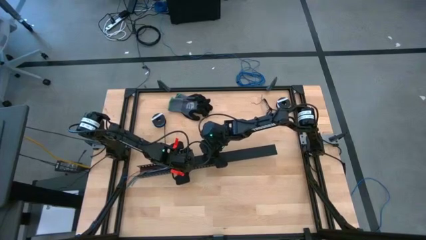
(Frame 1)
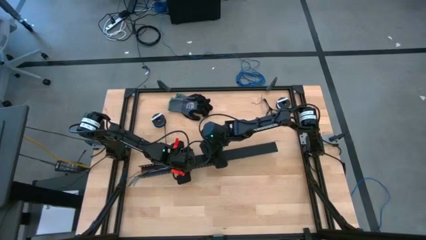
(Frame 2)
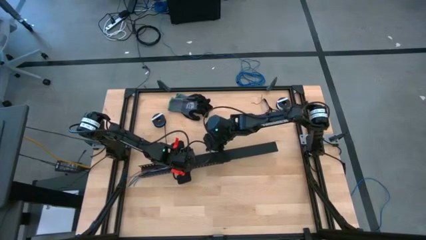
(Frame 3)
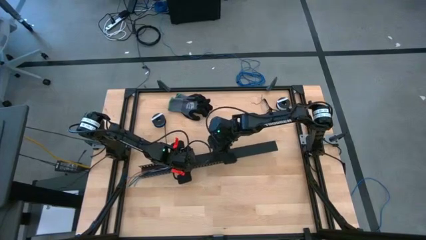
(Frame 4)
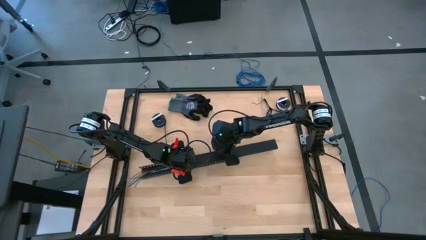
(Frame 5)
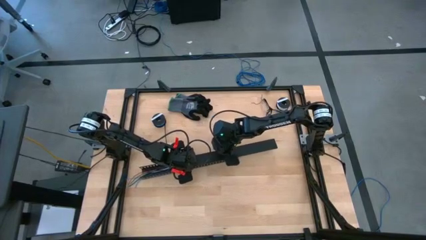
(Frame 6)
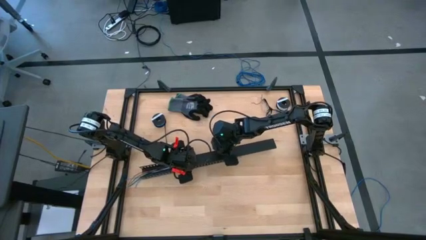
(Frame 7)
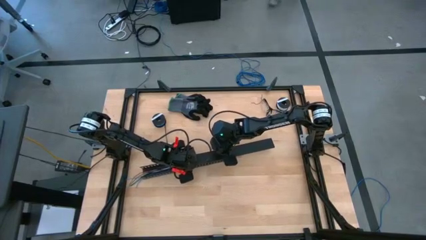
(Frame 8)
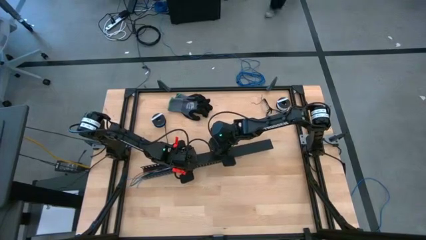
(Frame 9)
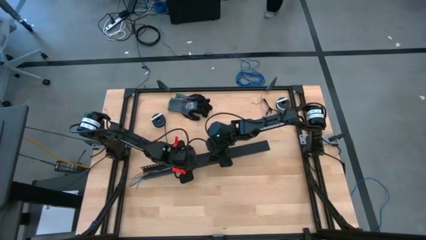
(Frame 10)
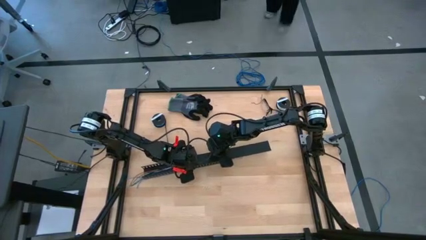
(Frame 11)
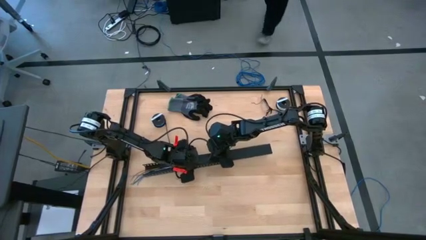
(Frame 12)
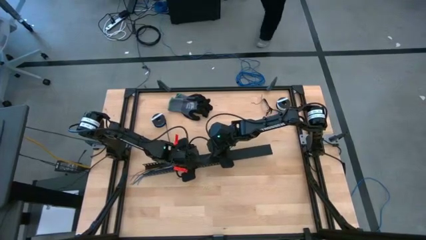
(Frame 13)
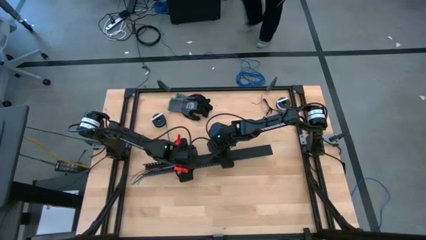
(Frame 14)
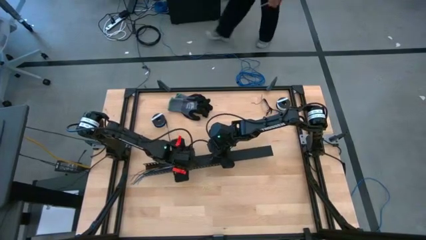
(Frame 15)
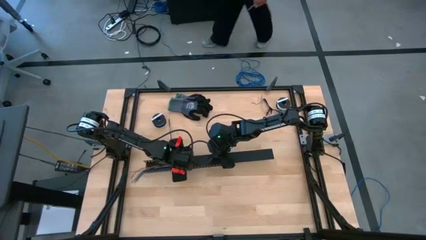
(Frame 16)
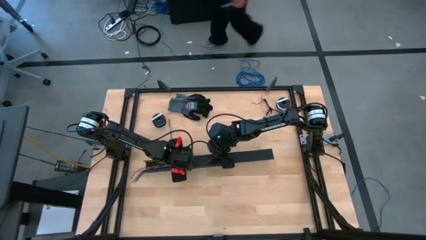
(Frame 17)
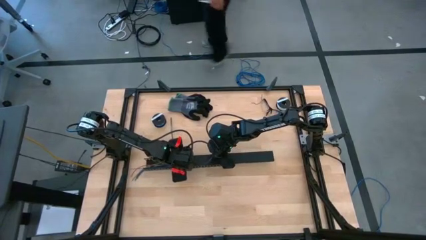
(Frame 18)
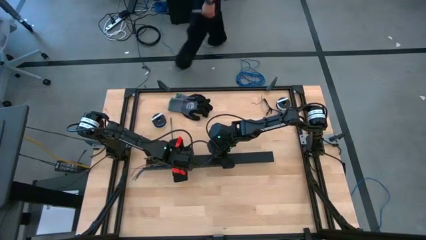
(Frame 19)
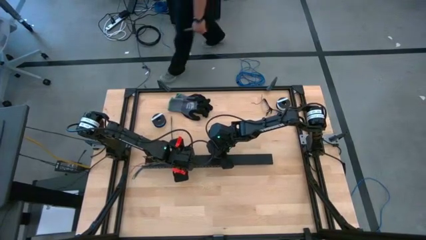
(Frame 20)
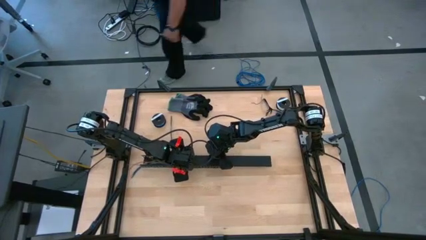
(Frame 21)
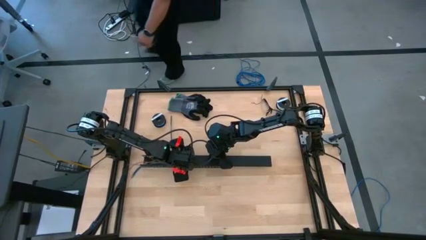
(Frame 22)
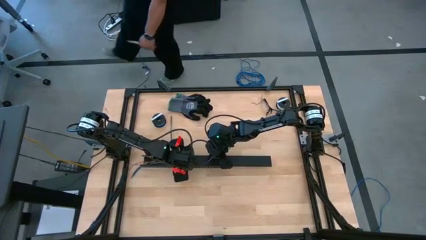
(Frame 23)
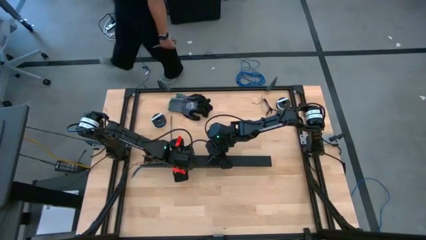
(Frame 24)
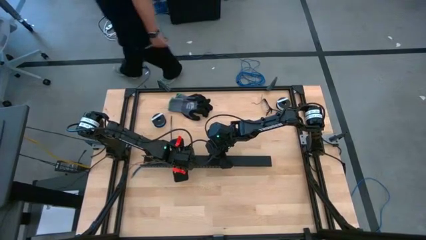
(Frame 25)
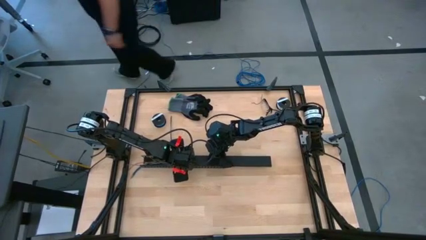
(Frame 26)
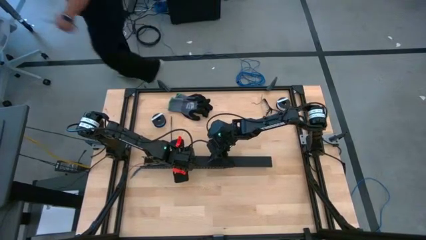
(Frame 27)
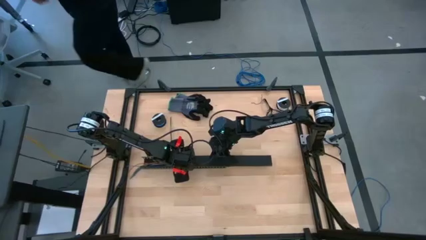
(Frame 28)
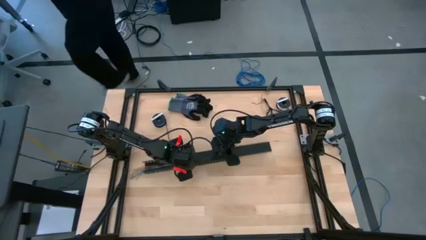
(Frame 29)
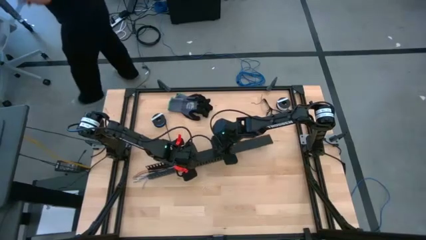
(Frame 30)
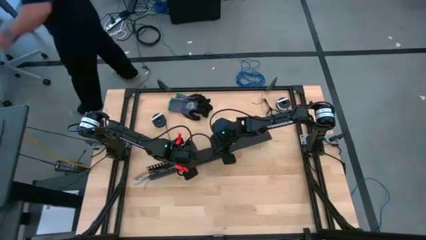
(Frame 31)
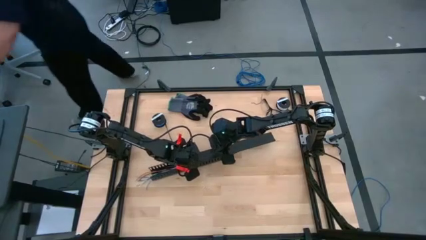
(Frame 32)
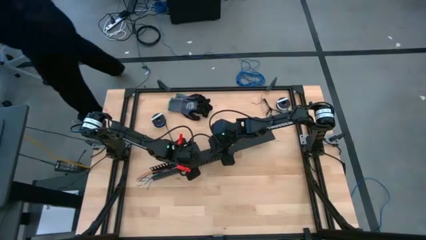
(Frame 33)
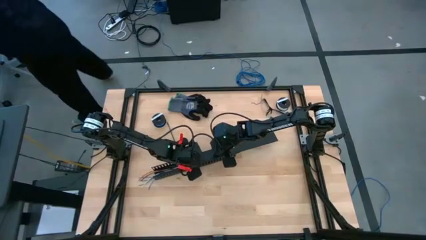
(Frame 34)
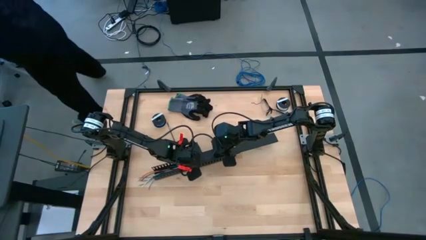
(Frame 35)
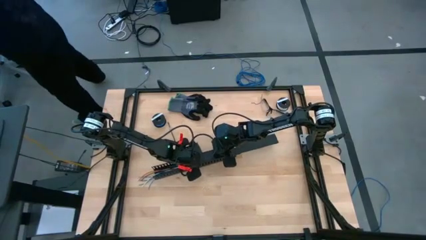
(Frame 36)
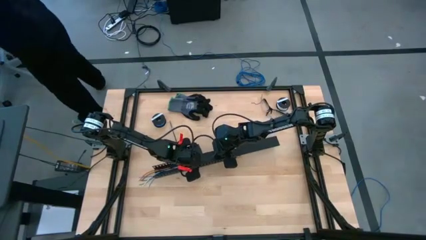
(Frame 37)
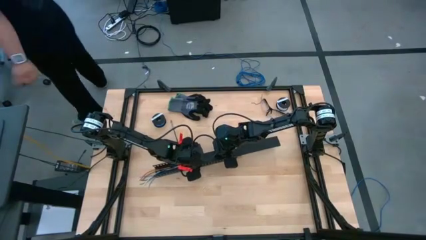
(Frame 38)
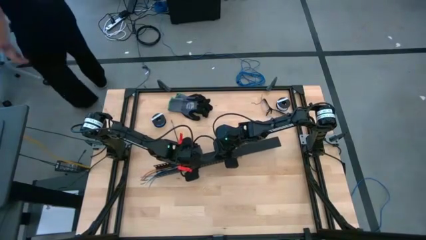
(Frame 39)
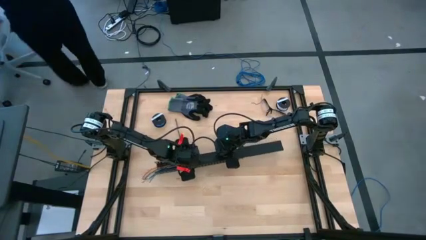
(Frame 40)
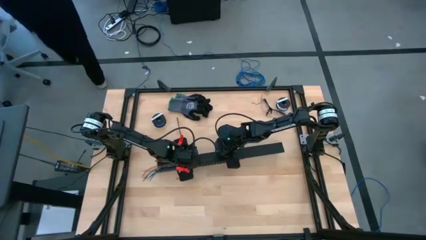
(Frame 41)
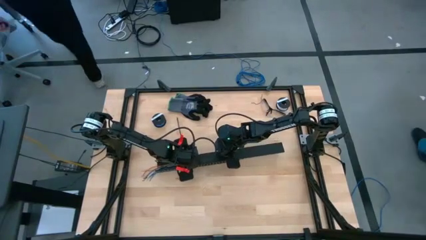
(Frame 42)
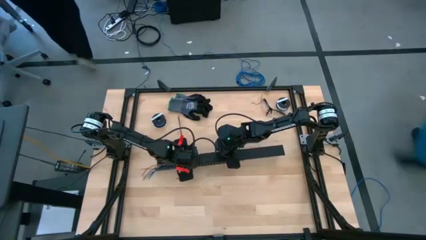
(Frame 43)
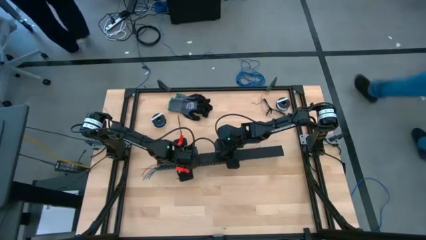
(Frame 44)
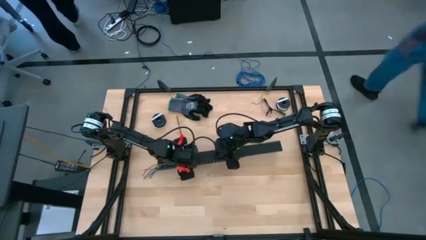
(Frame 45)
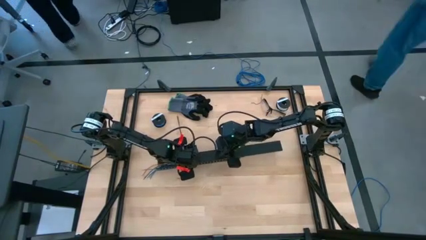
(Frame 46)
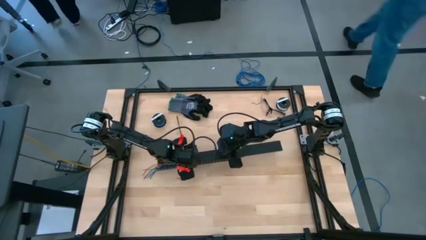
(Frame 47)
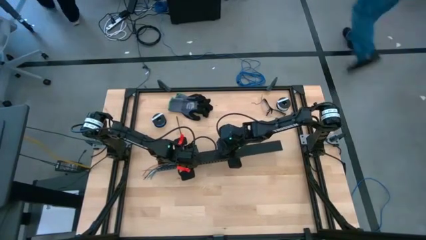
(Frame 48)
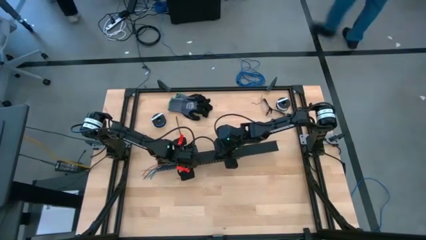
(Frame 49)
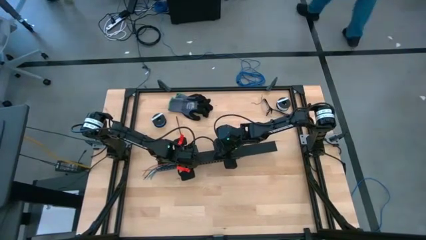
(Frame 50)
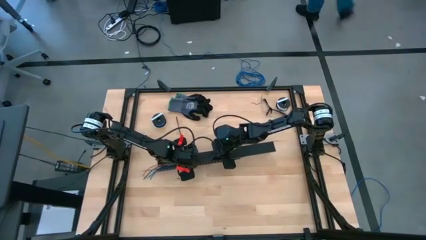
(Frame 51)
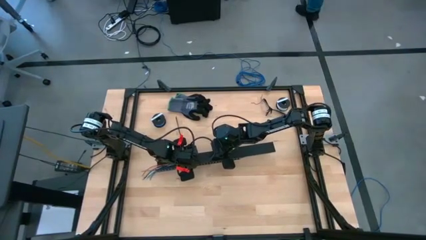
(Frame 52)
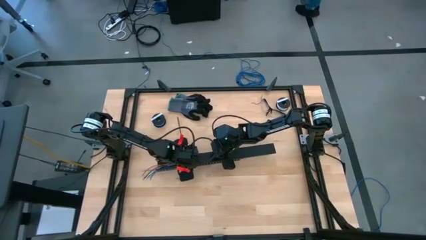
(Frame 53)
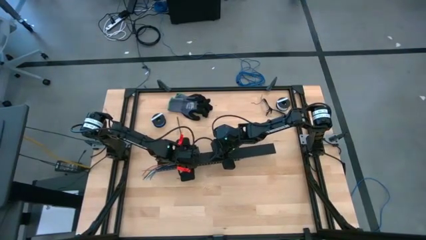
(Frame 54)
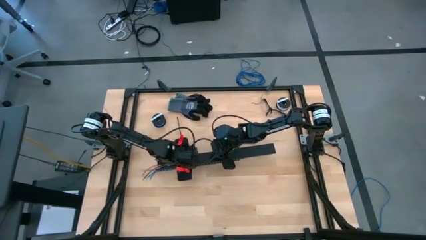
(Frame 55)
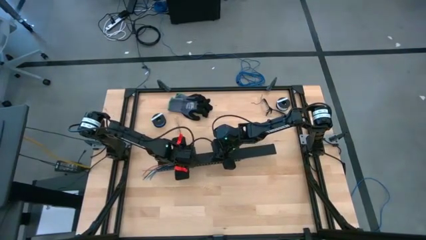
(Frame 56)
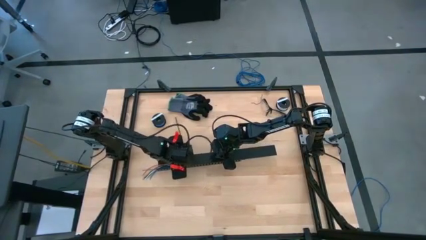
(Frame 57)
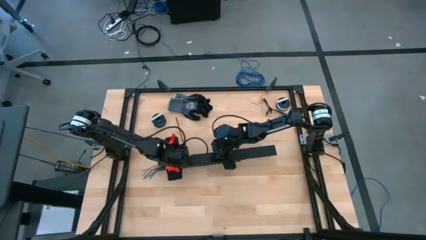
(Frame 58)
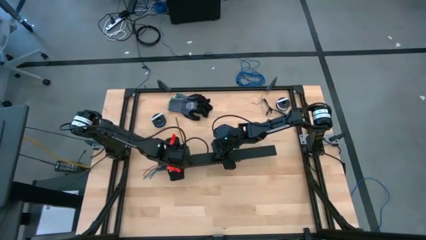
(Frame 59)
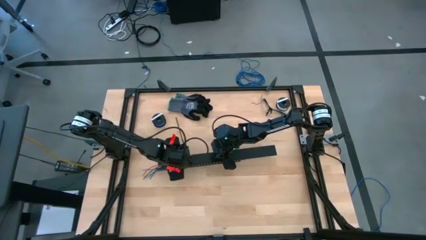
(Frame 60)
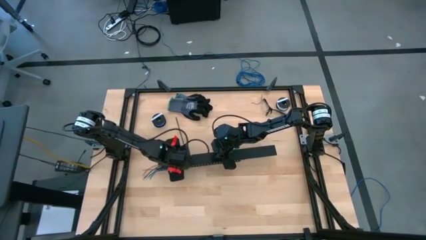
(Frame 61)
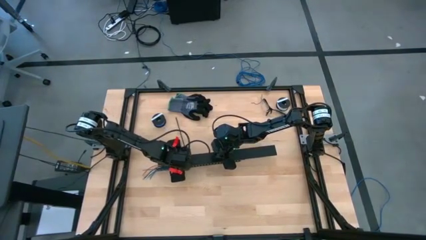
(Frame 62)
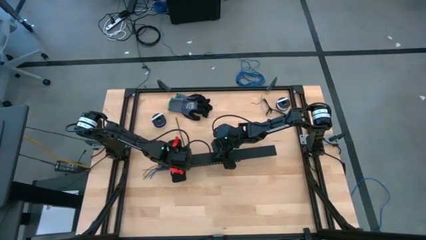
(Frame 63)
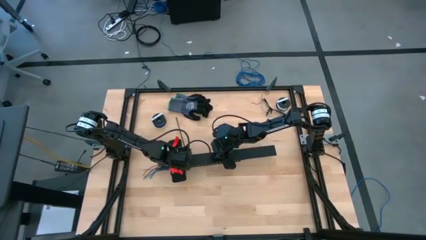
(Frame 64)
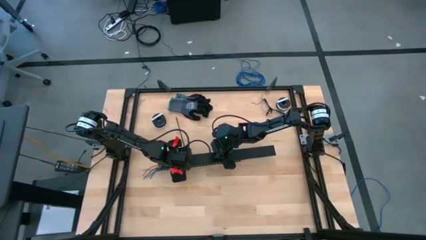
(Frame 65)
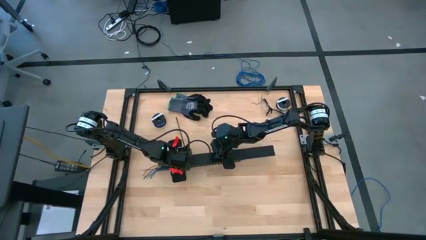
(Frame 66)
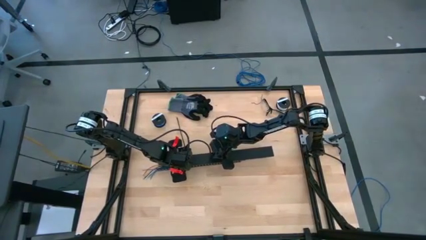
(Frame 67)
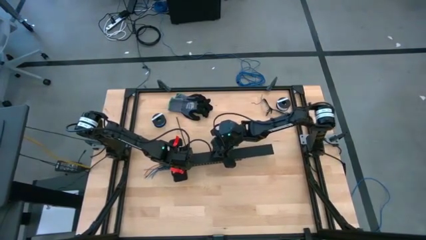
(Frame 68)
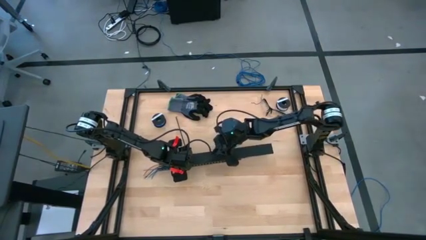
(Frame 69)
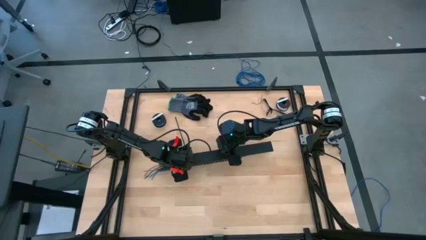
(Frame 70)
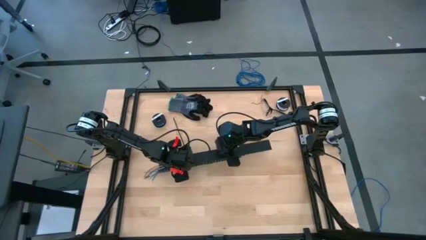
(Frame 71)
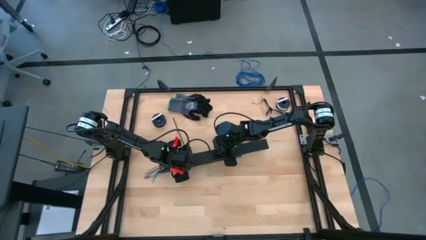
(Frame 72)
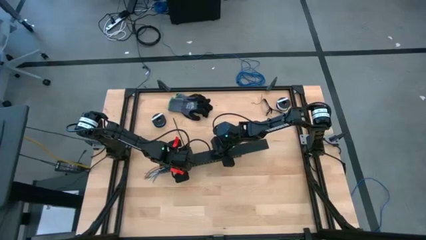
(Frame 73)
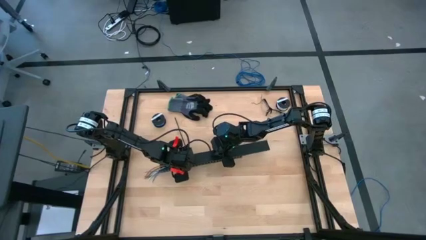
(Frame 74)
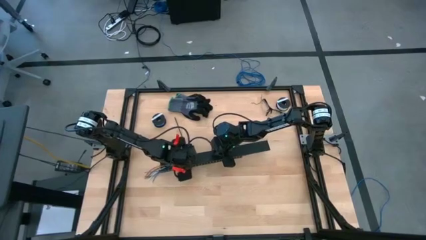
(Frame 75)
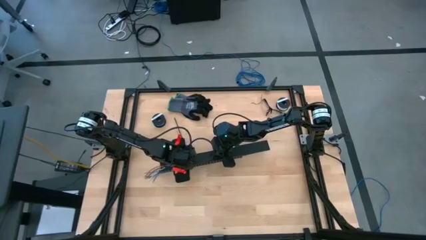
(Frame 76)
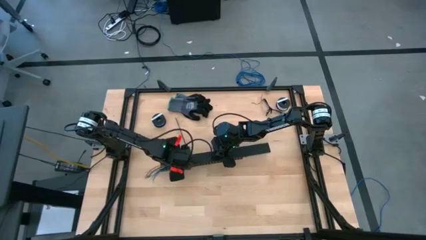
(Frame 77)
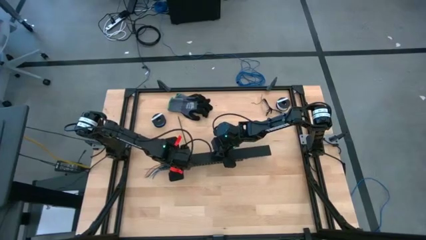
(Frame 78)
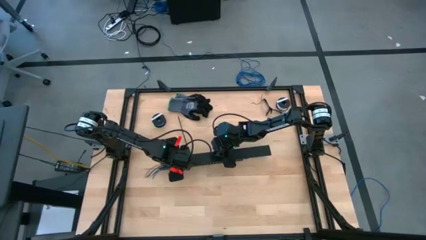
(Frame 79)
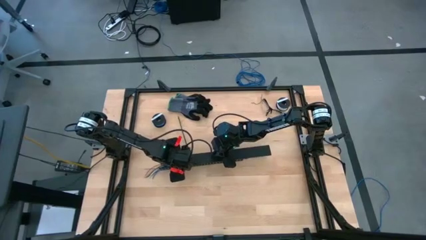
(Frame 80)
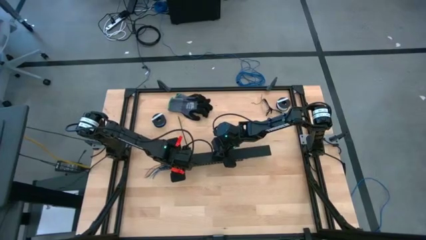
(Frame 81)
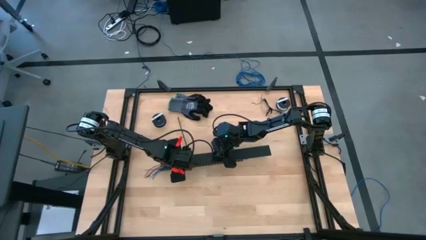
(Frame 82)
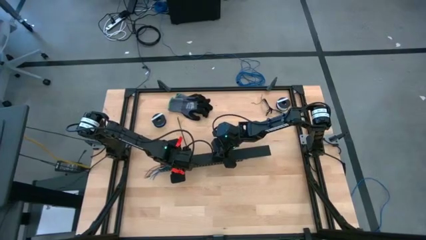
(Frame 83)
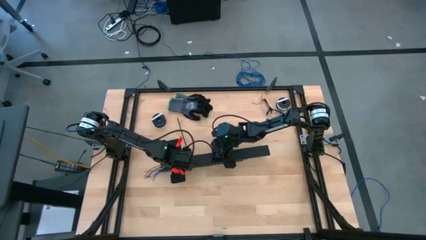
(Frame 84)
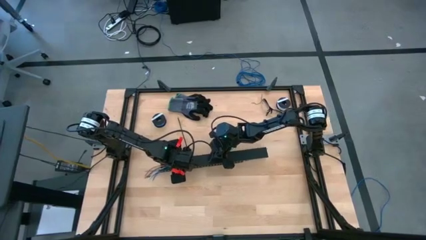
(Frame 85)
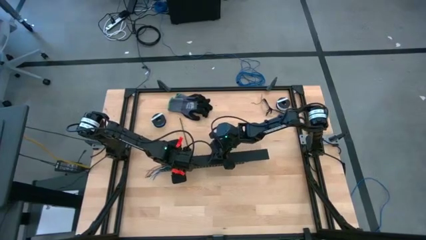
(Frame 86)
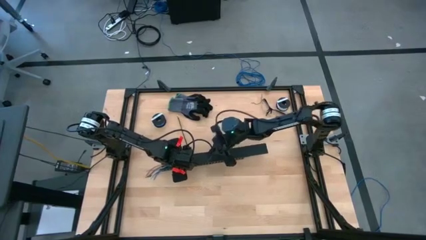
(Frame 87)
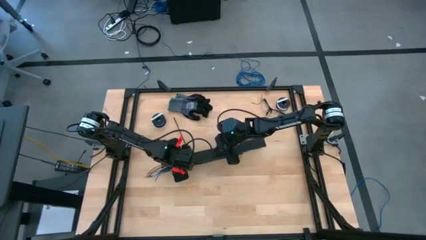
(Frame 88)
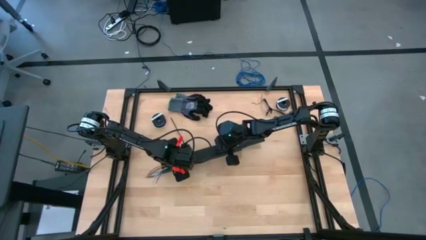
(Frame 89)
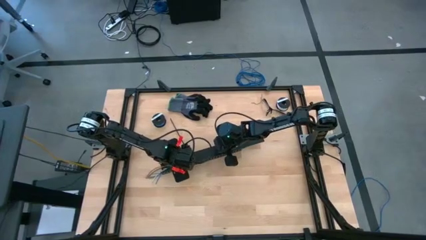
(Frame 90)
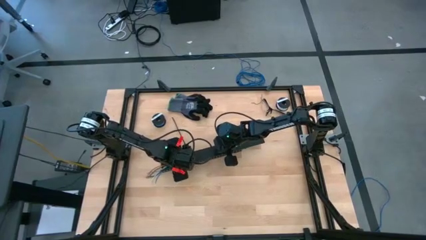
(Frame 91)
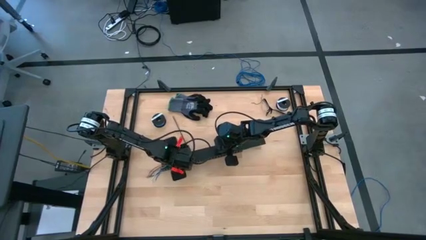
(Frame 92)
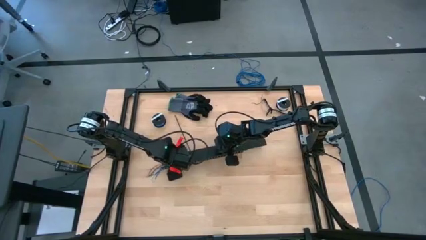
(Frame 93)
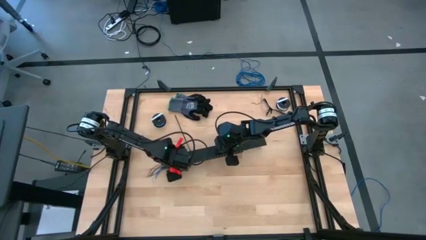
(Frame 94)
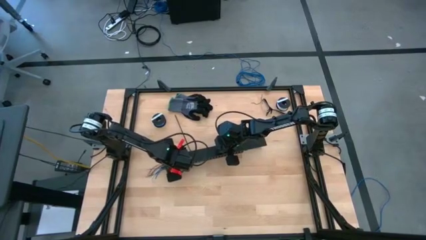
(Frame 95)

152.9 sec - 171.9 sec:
Task: Ziptie cables
Close the black cable duct with the cover
